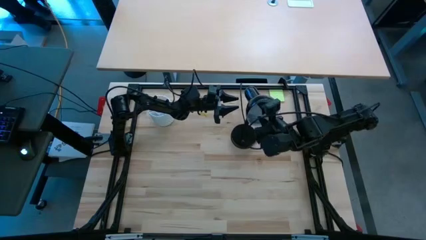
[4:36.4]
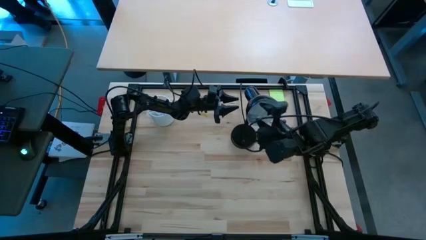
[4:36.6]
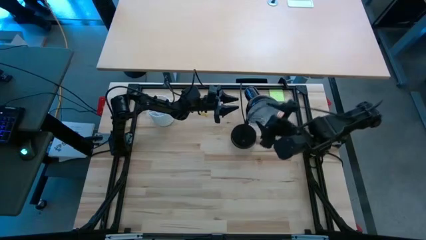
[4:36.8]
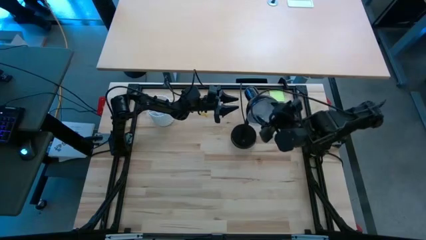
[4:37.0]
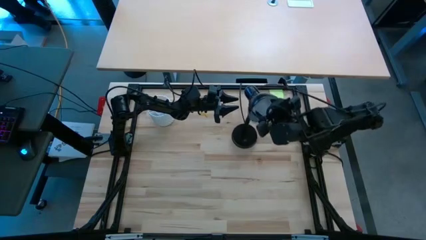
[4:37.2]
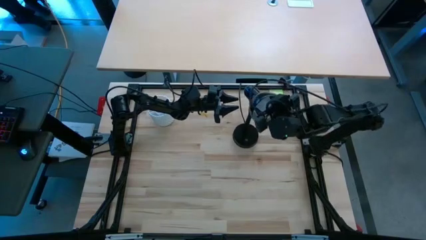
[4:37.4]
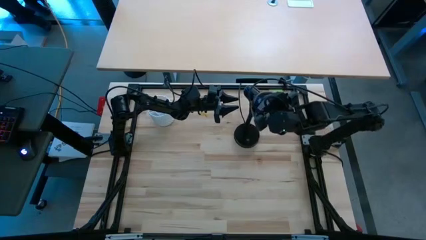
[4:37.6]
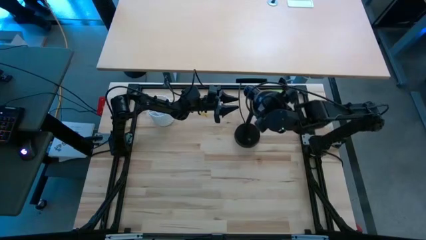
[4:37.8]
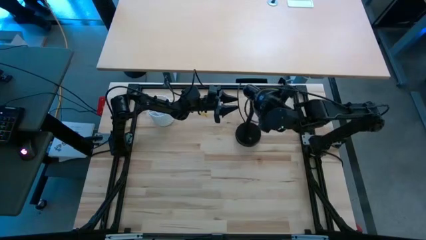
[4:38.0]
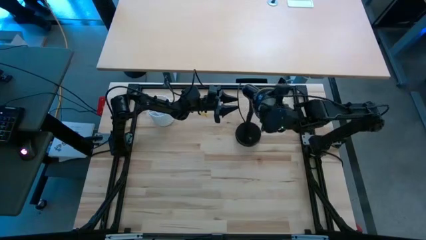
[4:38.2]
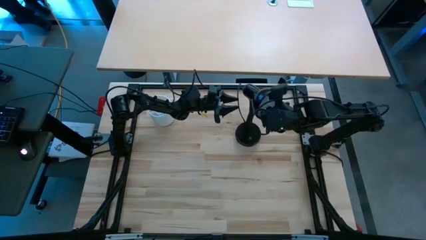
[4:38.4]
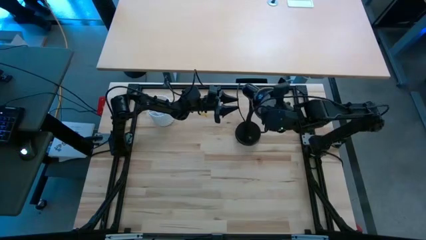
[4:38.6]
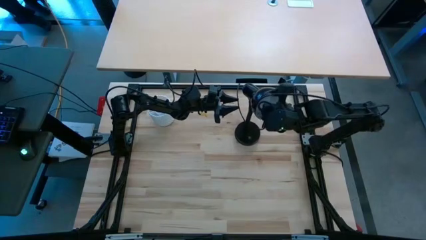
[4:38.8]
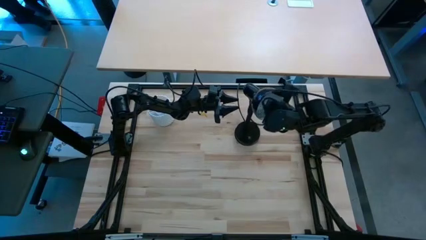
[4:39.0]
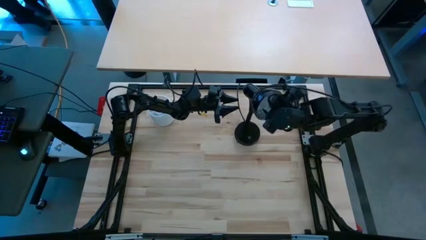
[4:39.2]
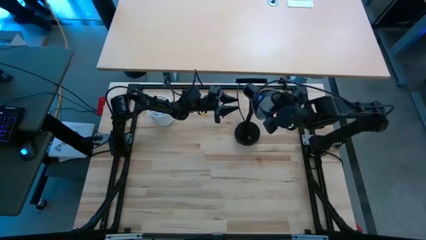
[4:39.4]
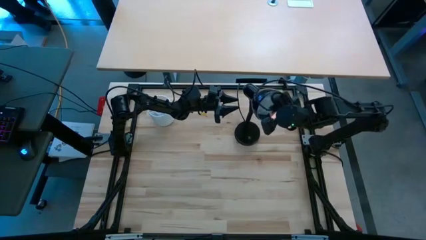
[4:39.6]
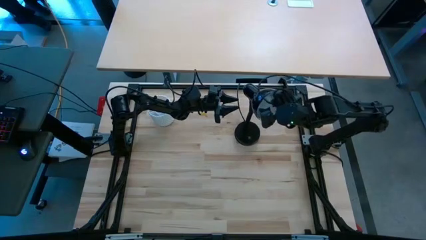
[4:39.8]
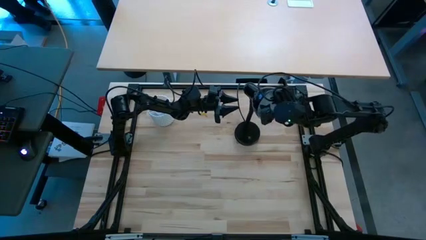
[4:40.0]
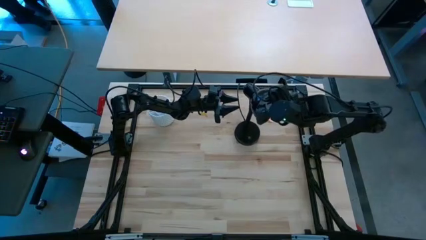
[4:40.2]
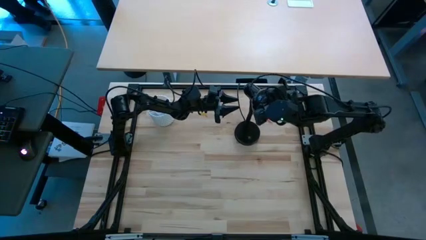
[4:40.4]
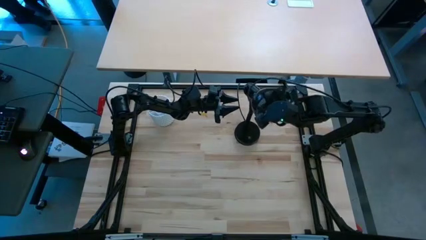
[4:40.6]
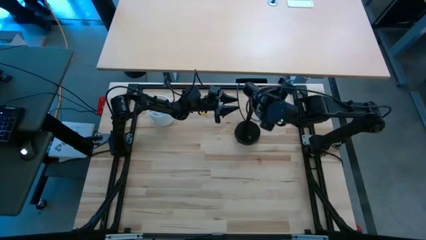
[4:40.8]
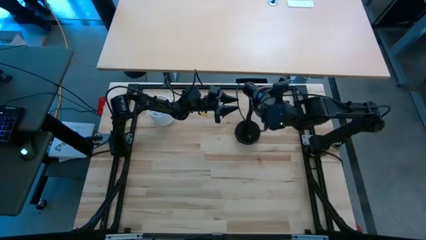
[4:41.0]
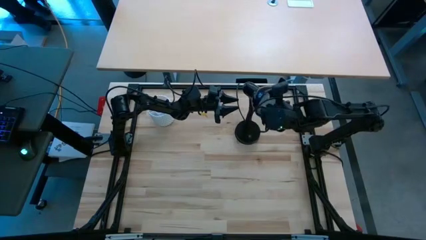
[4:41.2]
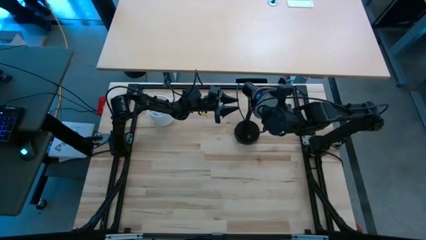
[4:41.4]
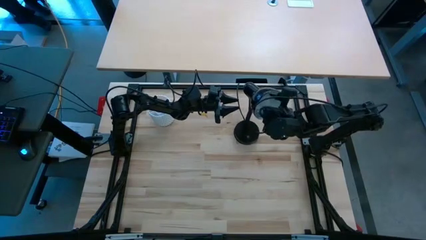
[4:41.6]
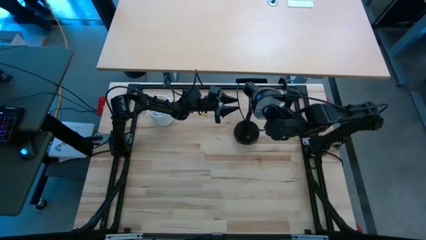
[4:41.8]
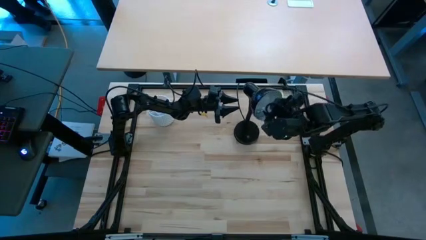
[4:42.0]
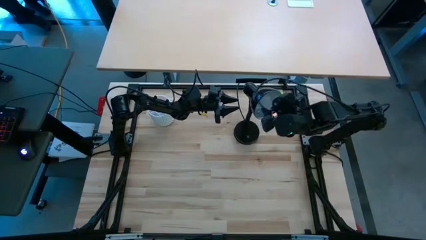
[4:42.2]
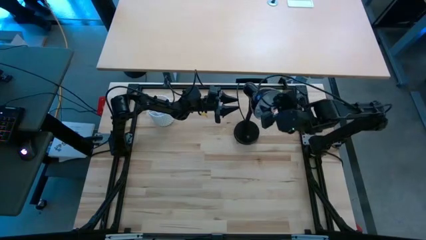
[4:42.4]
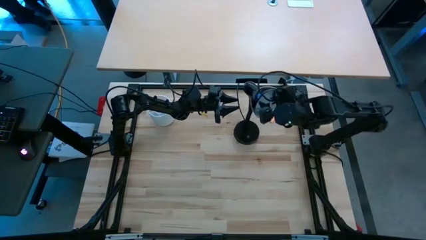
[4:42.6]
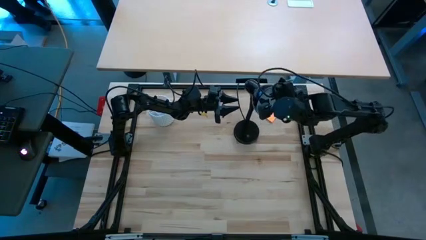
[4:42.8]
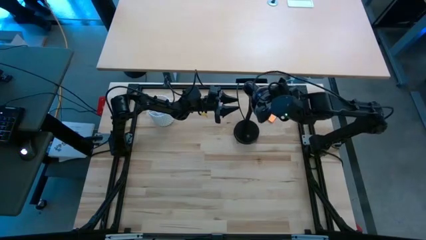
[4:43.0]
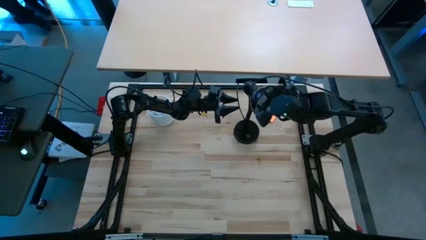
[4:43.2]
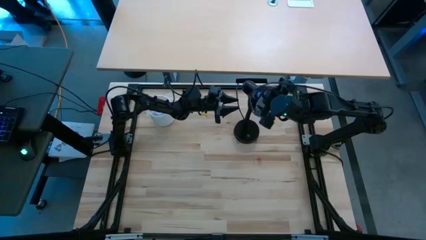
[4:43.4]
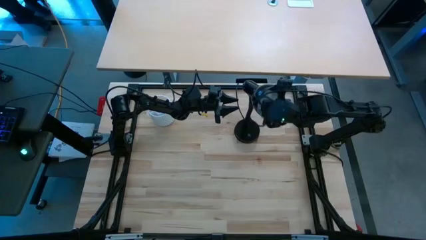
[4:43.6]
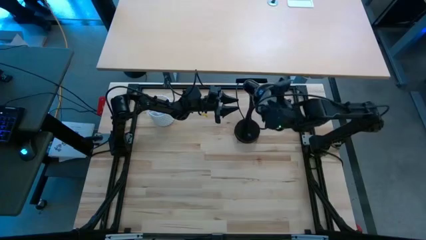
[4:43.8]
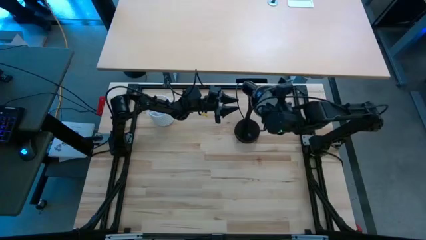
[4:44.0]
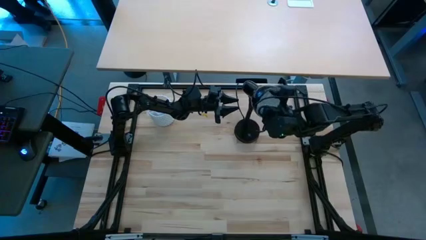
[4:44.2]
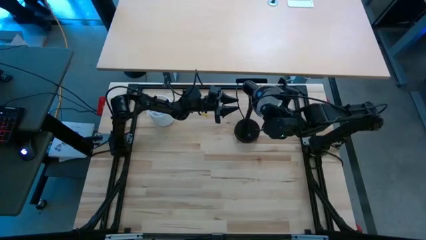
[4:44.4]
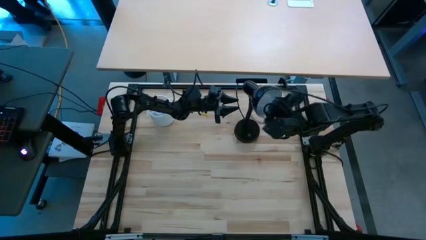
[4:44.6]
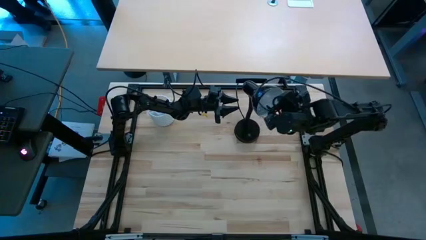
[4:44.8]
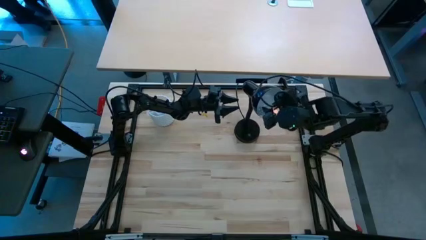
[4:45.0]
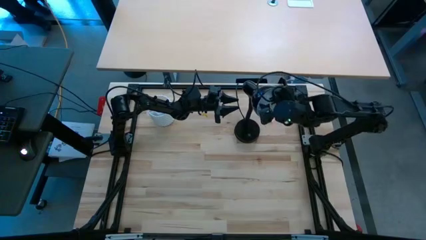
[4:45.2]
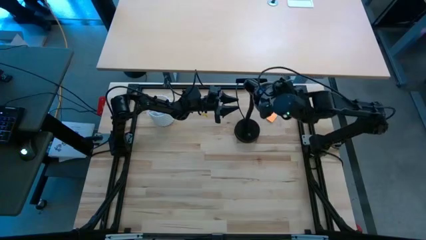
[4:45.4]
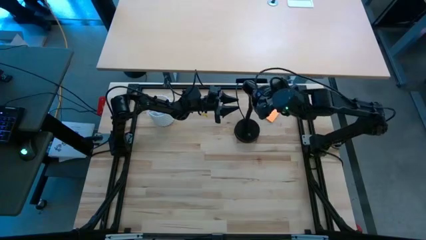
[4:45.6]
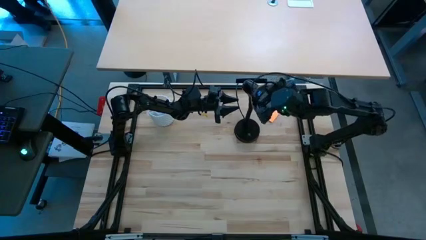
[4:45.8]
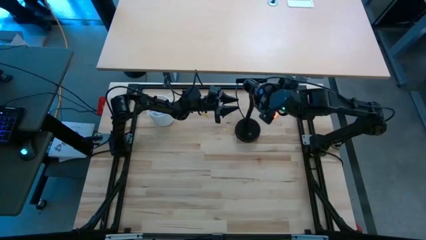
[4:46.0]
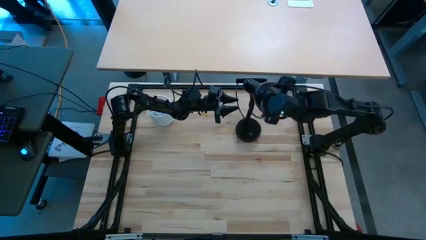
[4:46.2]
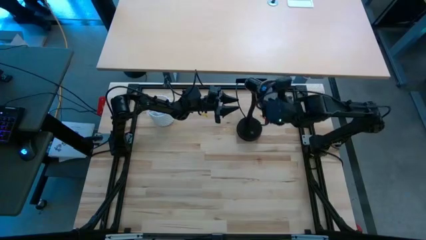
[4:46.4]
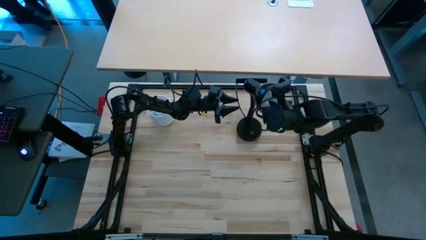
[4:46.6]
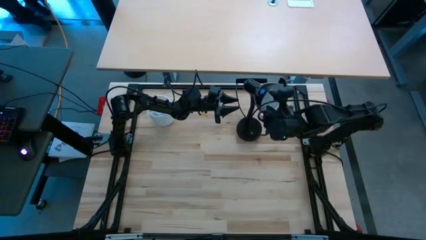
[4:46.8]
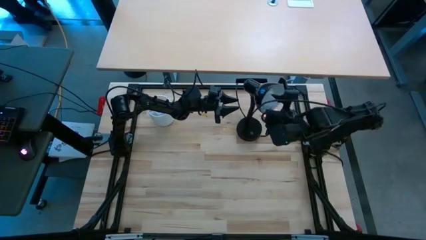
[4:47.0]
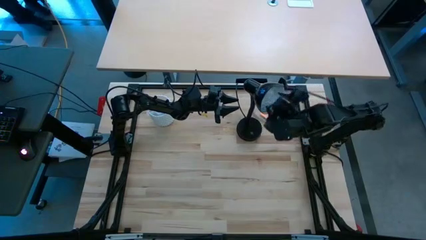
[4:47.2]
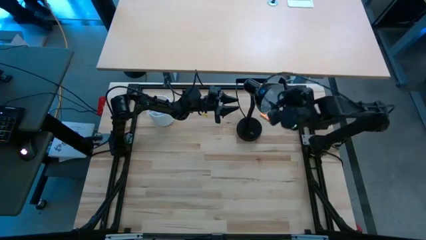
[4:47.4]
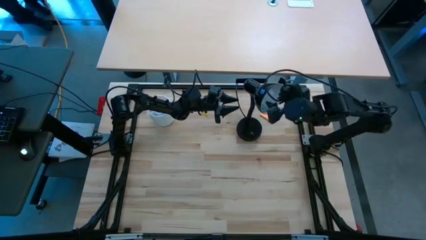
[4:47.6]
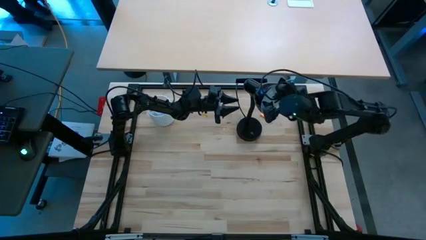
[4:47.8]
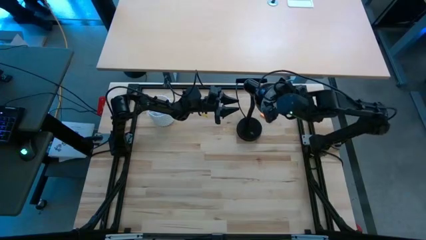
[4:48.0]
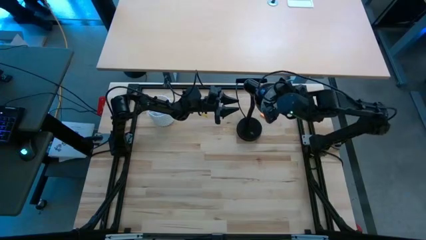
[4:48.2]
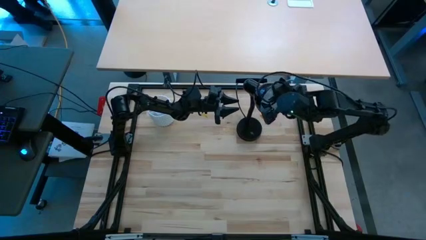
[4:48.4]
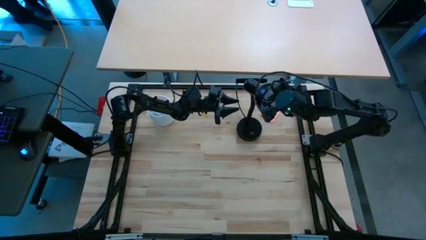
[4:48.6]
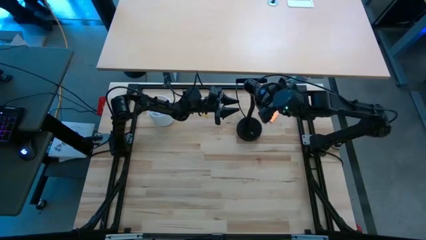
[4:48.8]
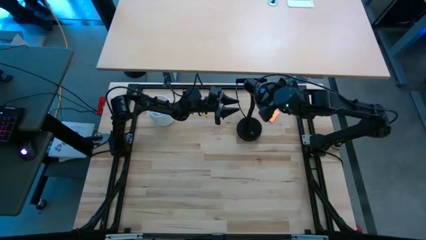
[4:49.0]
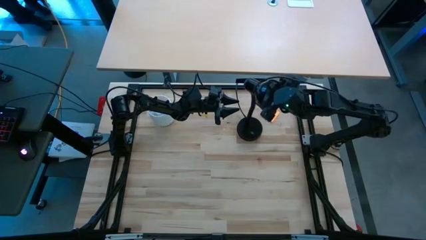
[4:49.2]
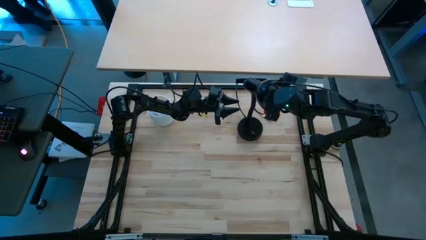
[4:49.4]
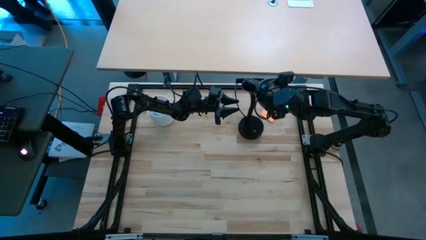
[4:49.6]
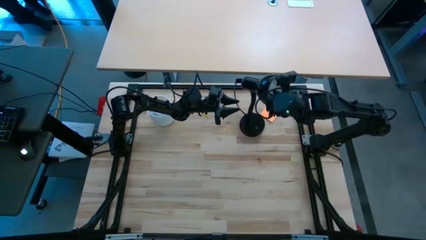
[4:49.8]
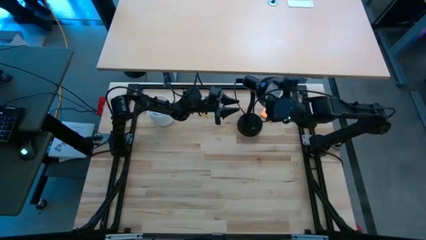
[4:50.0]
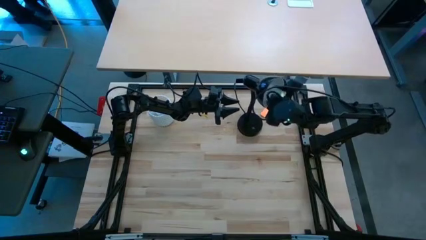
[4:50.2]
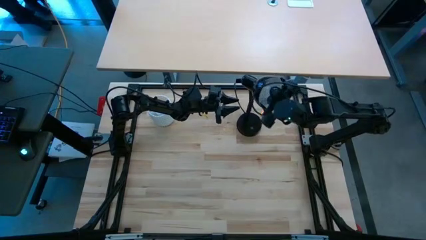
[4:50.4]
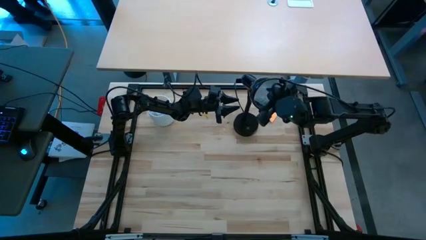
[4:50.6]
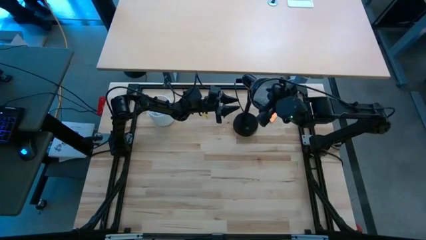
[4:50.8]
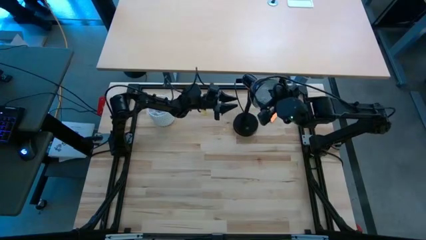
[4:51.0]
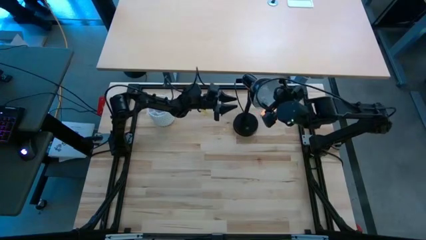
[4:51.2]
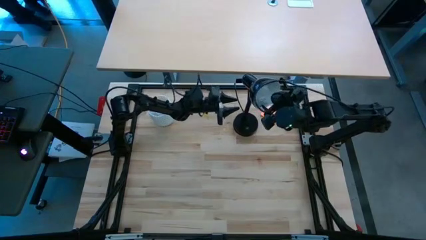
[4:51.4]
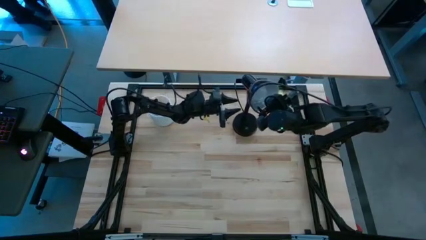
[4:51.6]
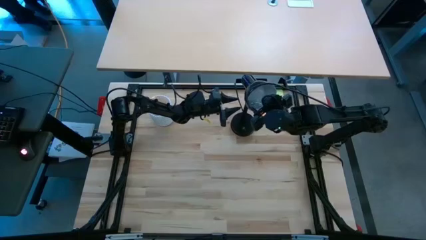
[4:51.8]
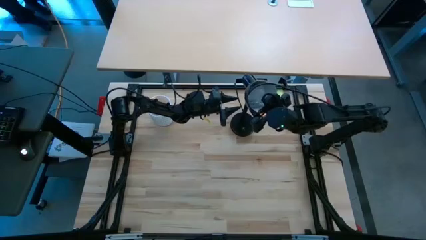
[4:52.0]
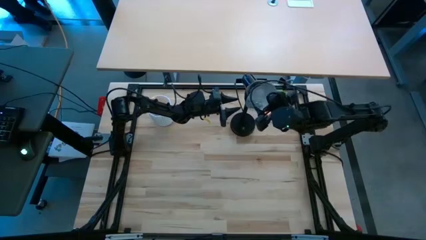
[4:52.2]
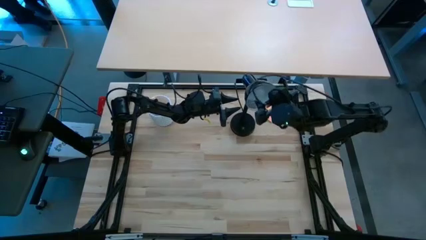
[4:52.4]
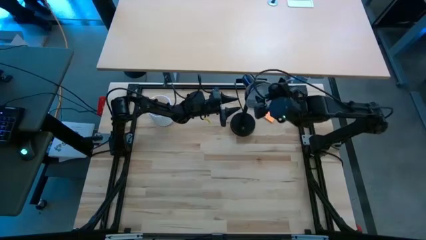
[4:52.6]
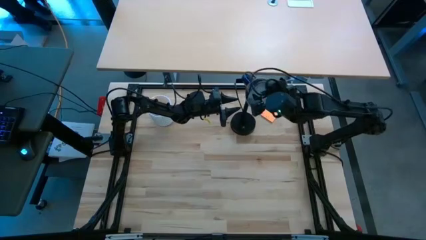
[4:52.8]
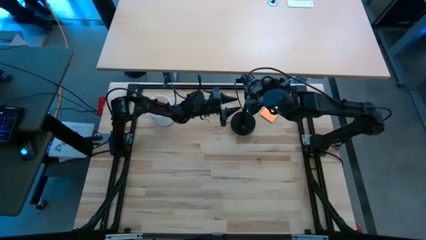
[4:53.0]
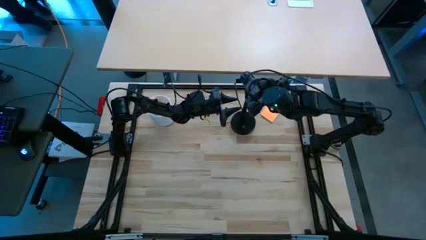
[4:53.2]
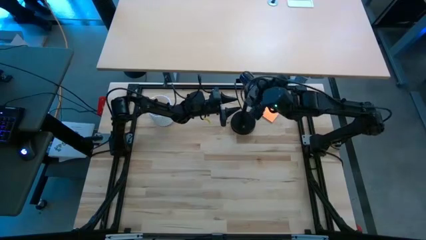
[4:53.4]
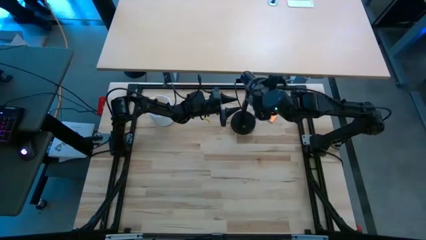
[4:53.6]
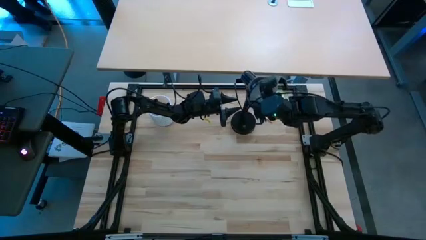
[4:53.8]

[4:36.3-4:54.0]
Task: Screw lightbulb
Remove the light bulb from the desk lamp
